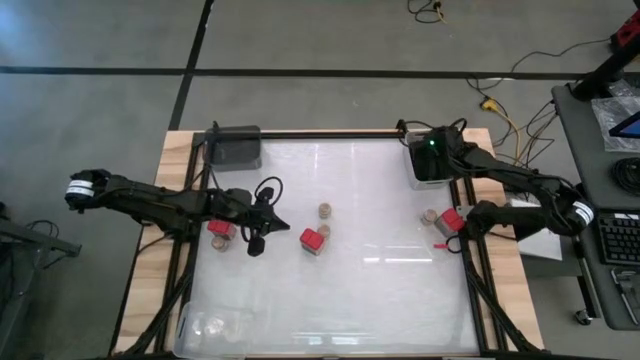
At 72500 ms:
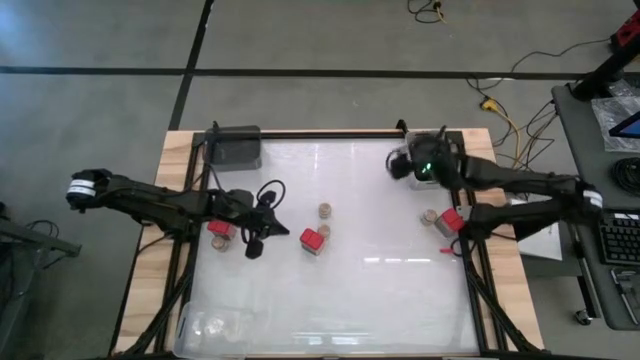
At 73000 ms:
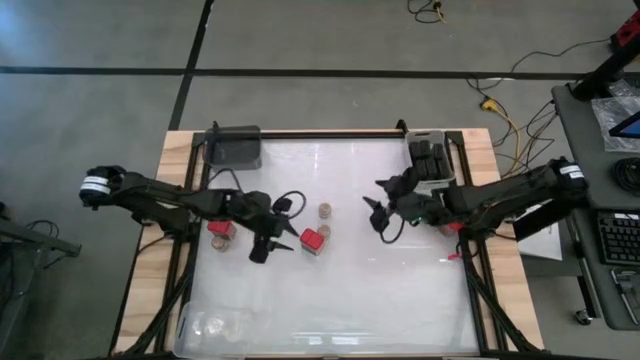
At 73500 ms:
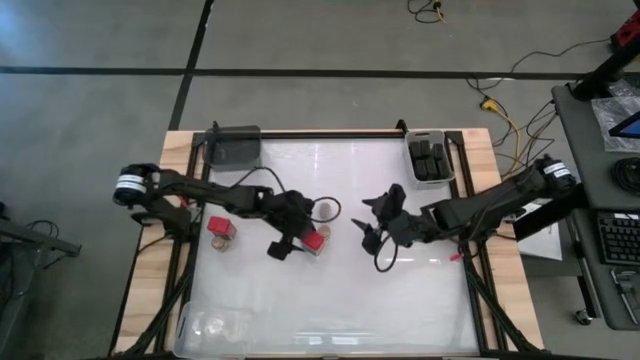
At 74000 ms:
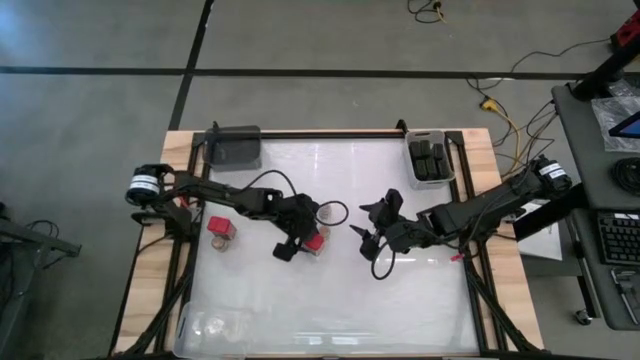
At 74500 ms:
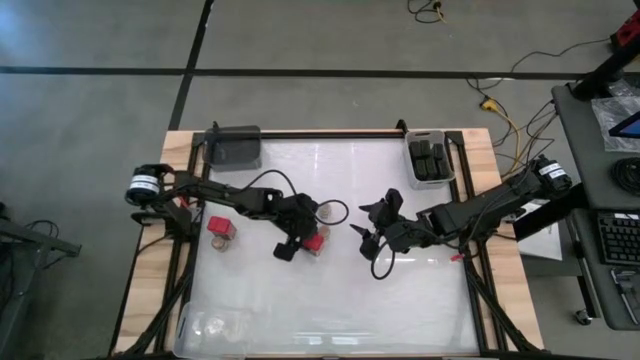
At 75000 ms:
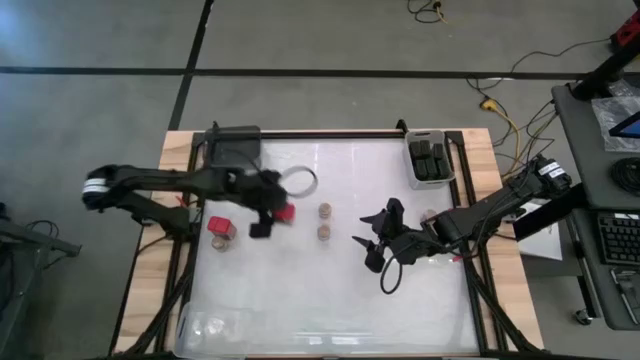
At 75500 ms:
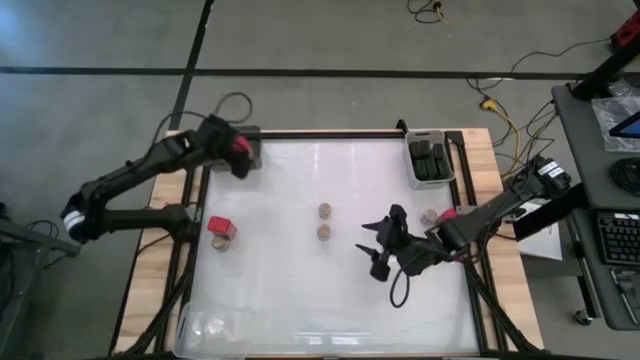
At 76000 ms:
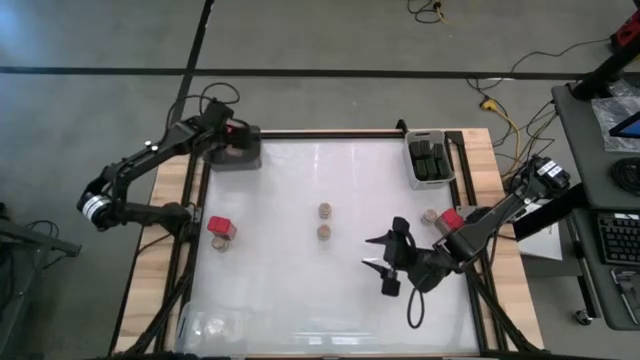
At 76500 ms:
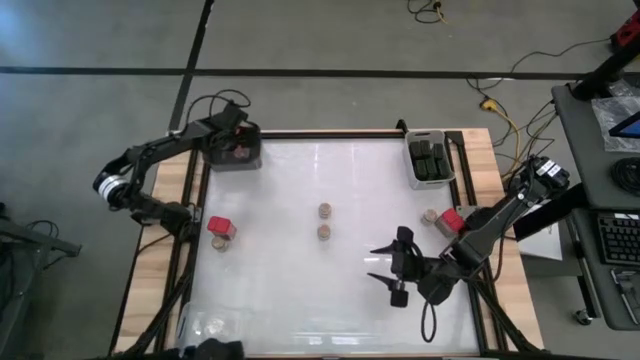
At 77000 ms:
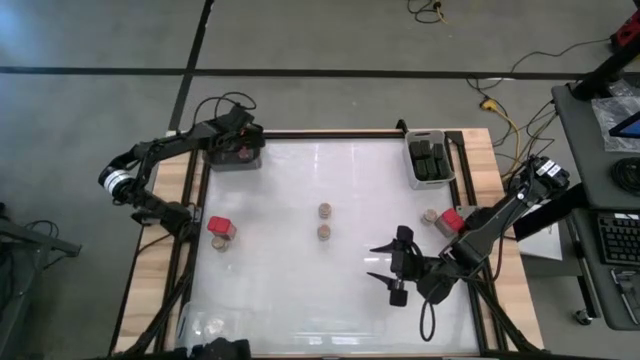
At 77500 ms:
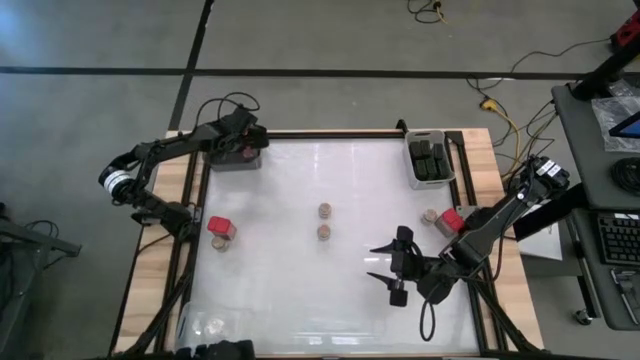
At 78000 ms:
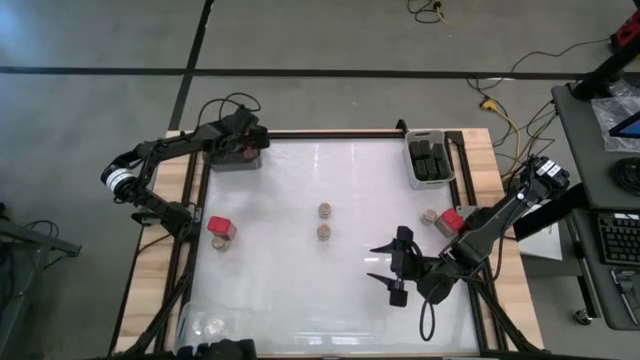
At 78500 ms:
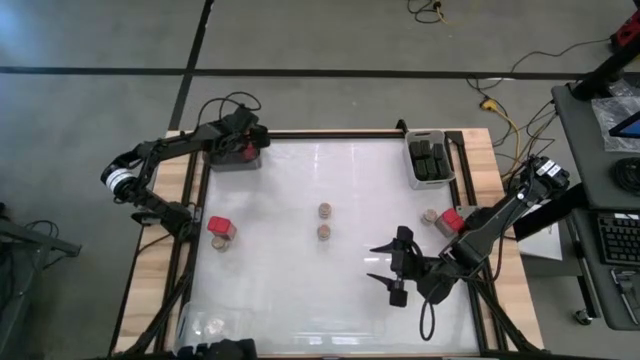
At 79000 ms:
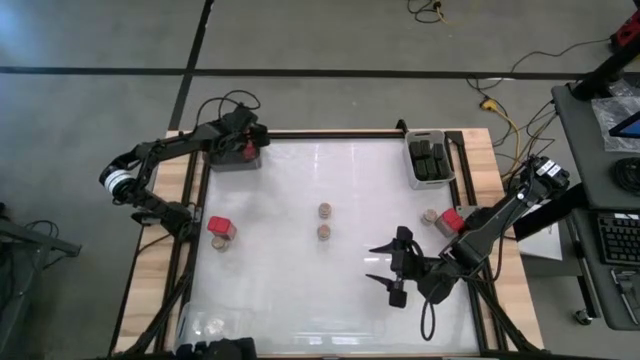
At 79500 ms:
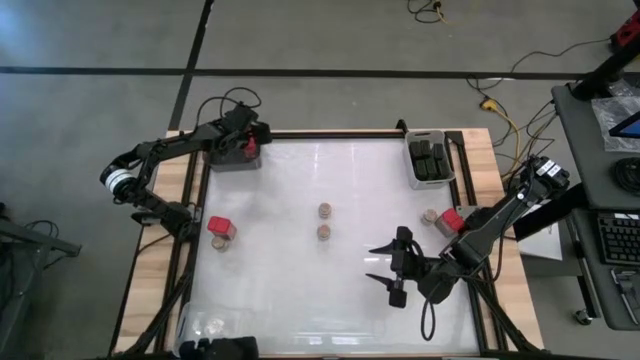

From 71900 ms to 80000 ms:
Task: Sort spices by type
Put the red seasoning can into the black bin

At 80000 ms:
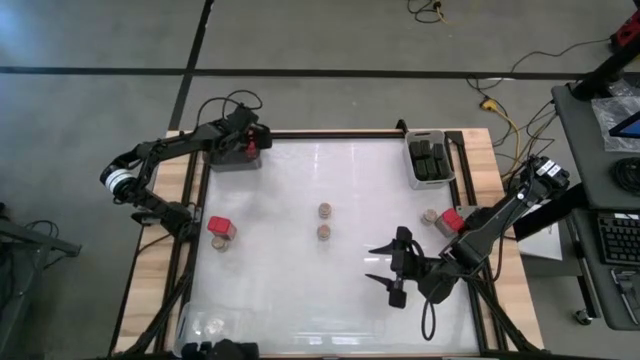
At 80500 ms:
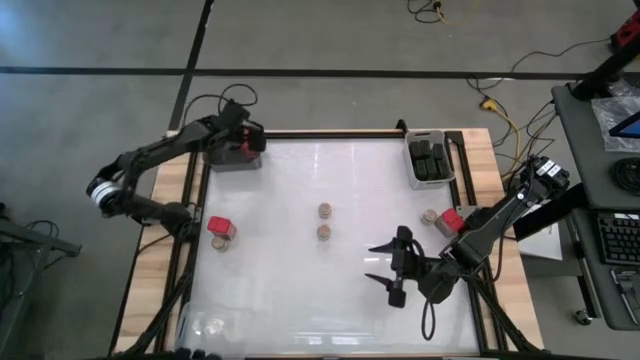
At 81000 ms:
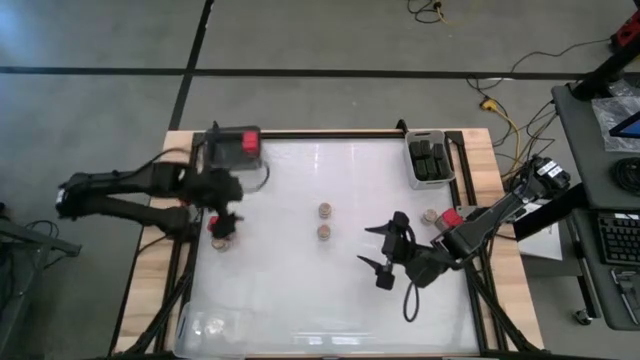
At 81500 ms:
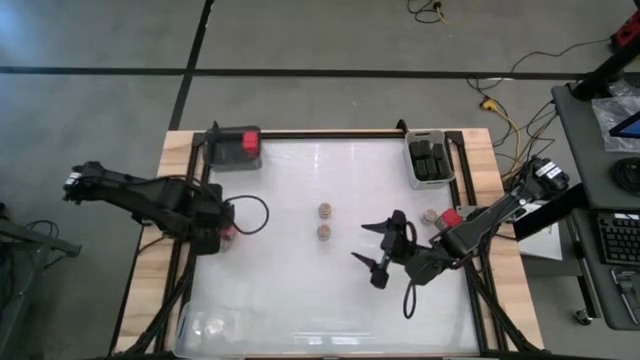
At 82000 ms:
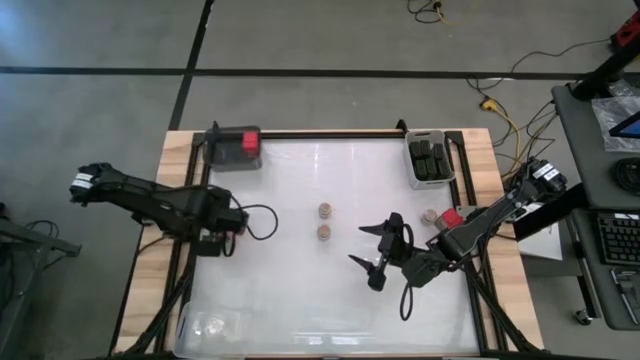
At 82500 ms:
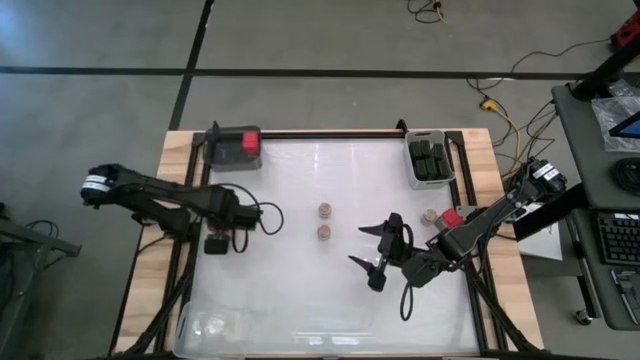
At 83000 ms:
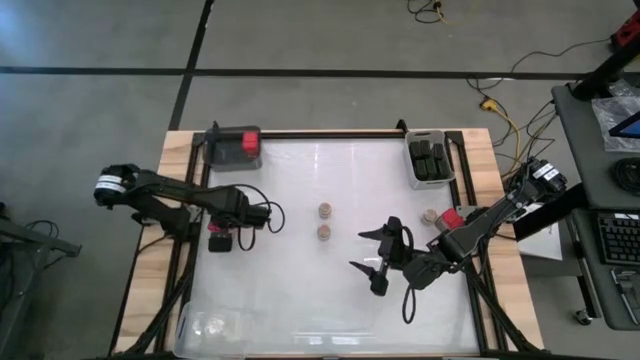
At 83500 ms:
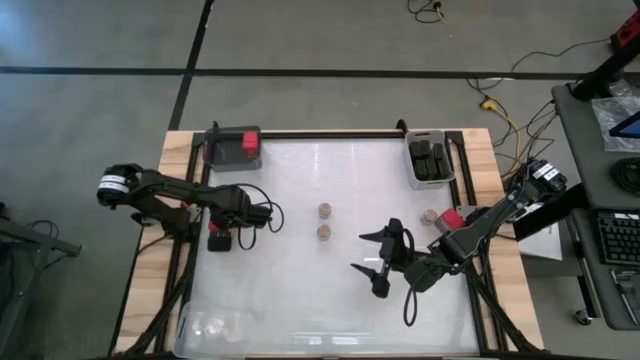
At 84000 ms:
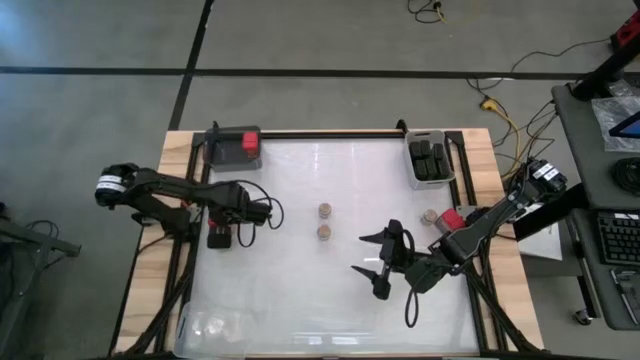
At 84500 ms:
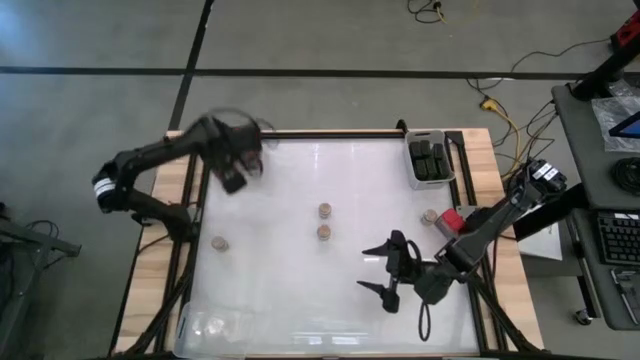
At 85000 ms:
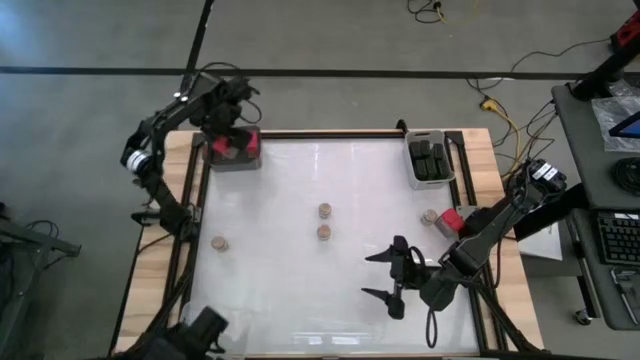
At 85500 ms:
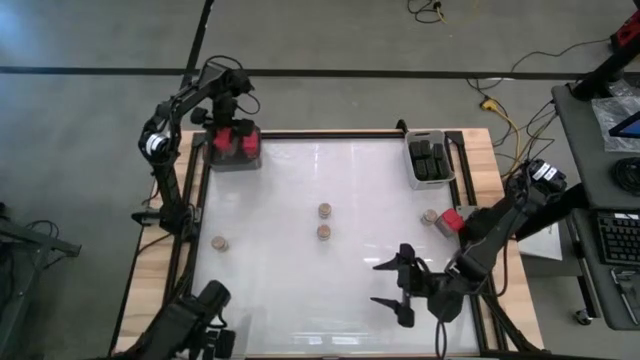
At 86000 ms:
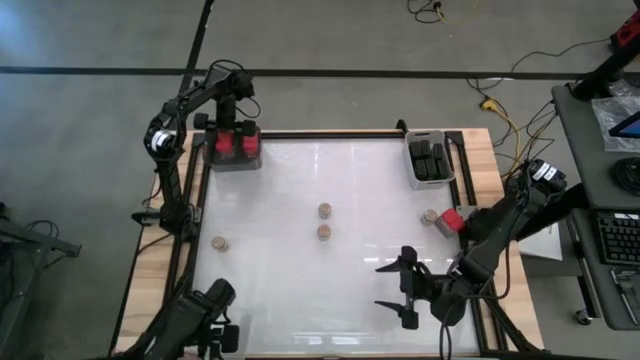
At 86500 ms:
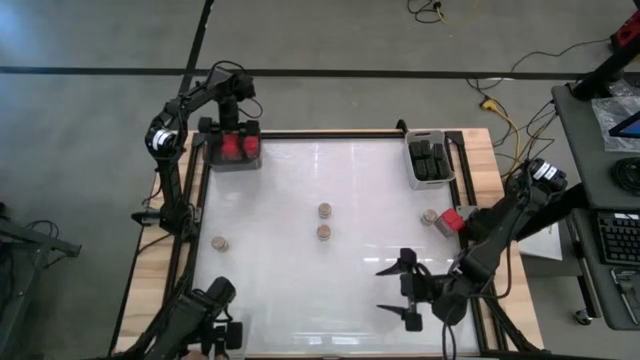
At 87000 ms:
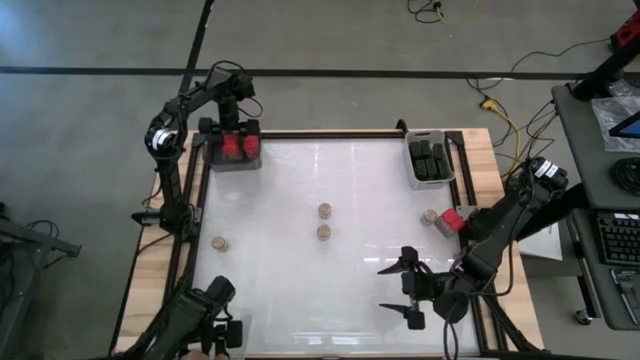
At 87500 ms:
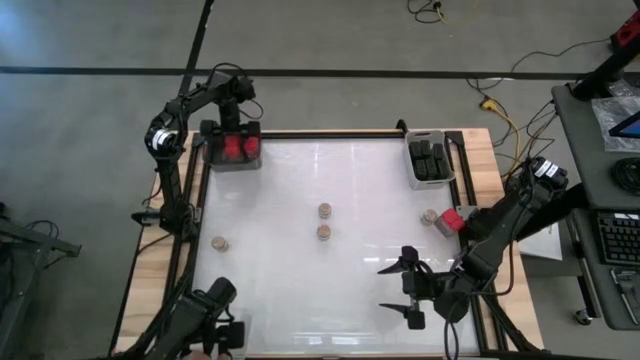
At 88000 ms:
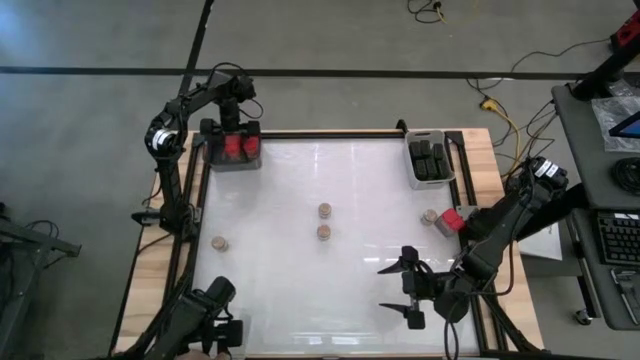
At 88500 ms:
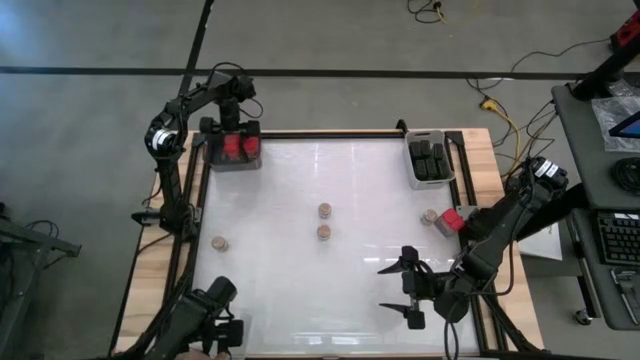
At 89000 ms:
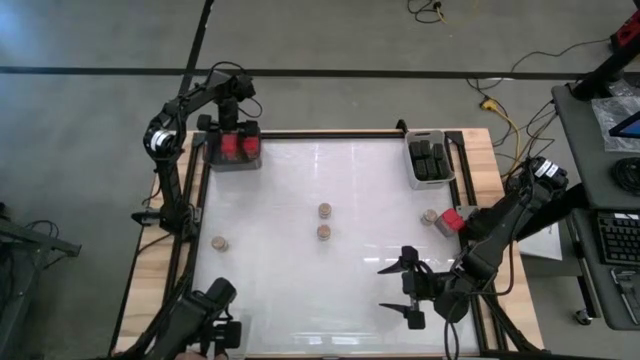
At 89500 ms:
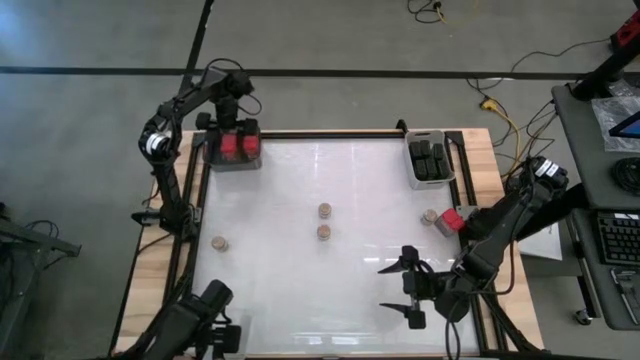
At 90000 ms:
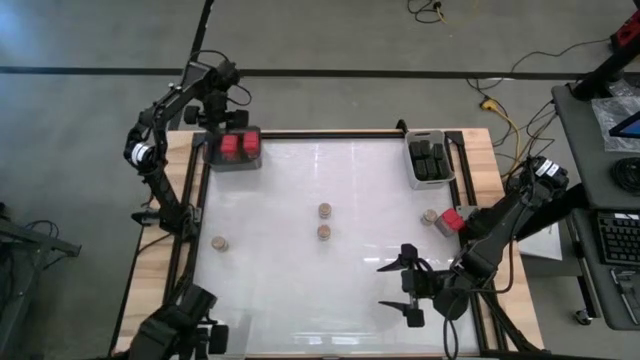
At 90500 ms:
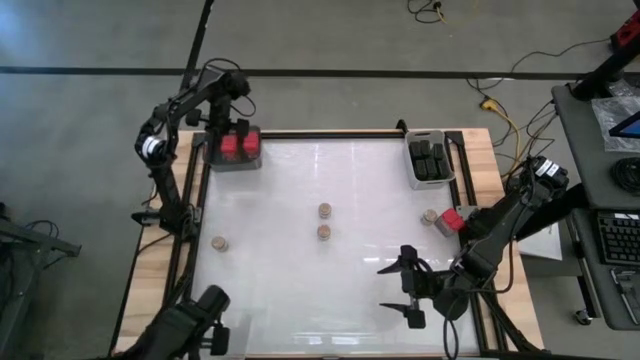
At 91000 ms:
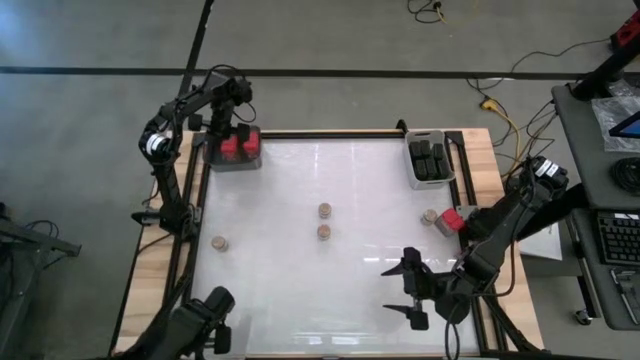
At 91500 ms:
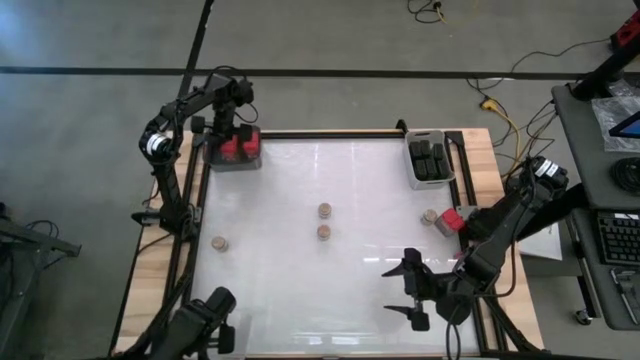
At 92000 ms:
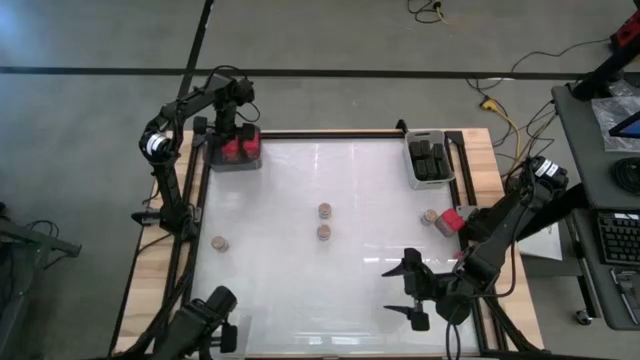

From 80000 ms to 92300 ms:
Put the red seasoning can into the black bin
